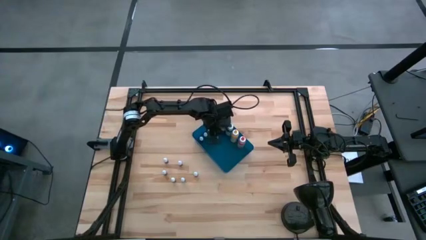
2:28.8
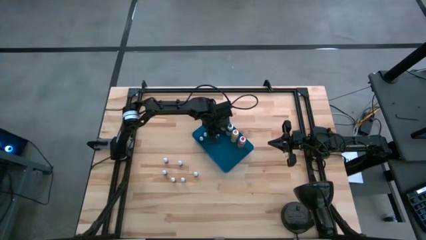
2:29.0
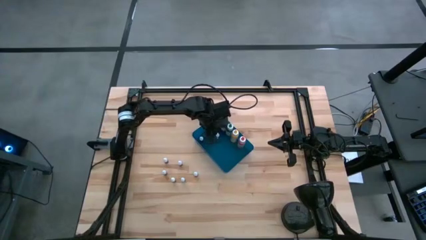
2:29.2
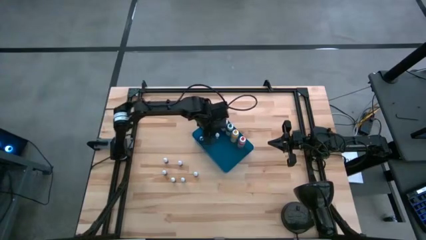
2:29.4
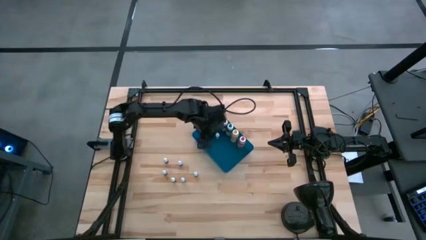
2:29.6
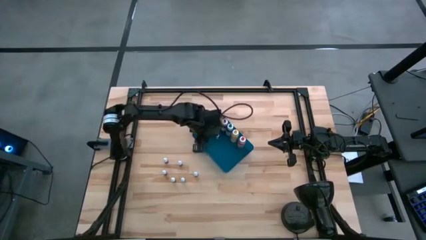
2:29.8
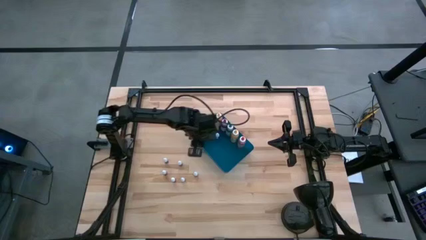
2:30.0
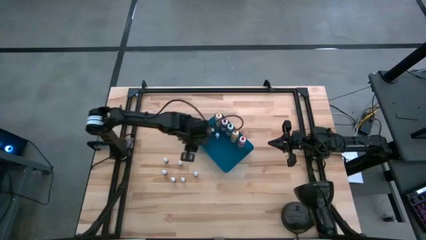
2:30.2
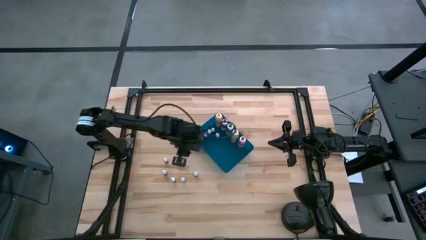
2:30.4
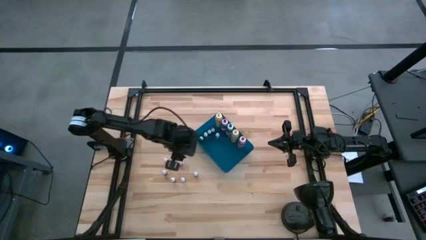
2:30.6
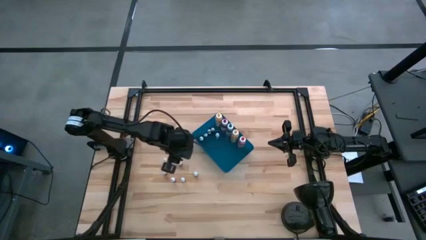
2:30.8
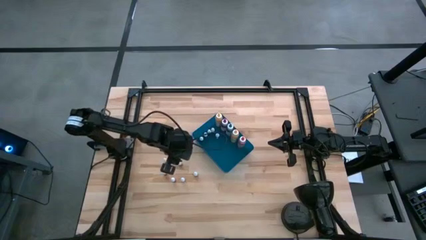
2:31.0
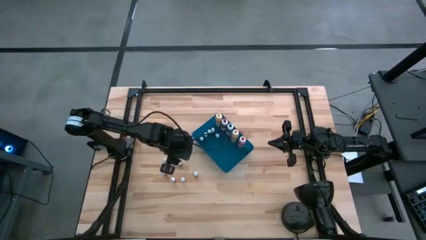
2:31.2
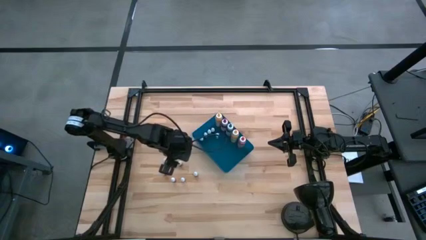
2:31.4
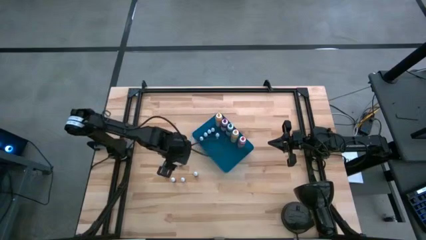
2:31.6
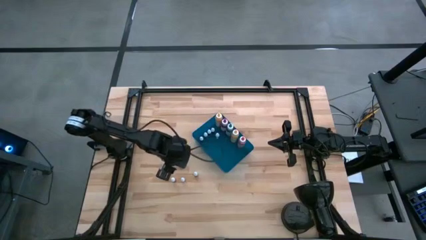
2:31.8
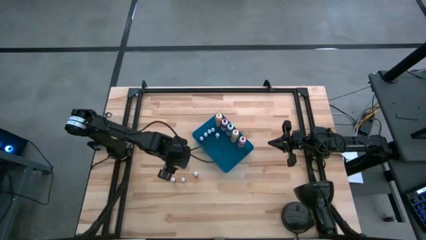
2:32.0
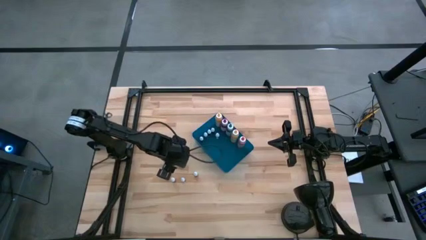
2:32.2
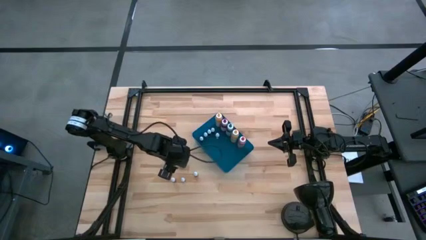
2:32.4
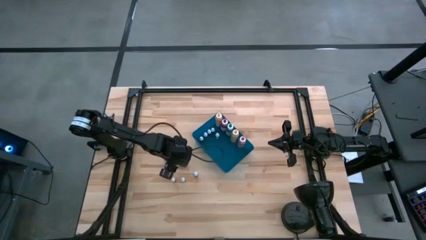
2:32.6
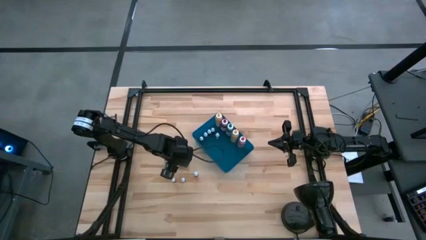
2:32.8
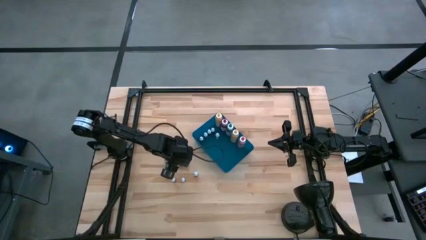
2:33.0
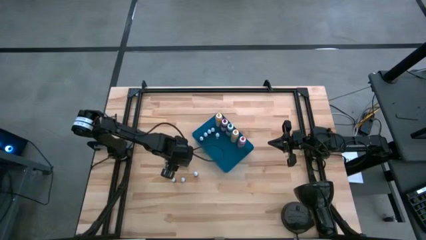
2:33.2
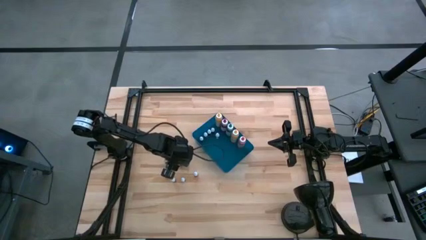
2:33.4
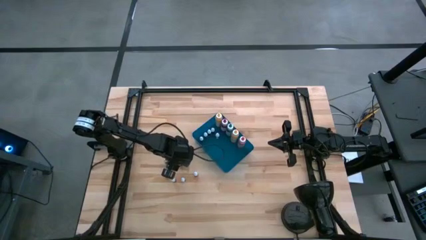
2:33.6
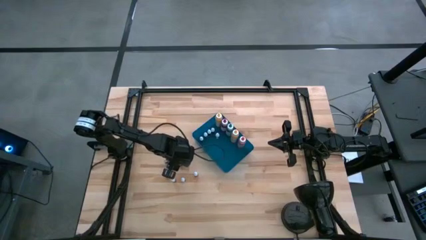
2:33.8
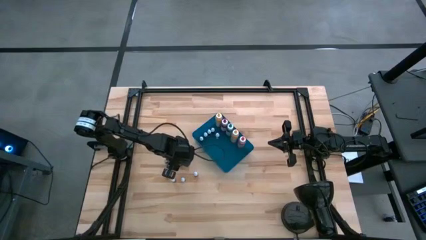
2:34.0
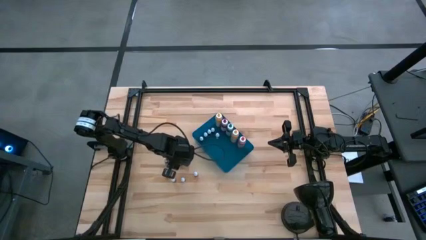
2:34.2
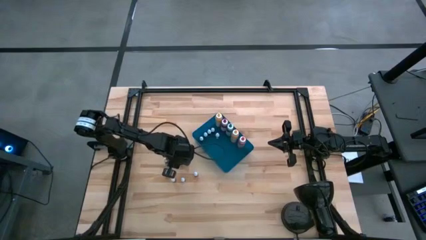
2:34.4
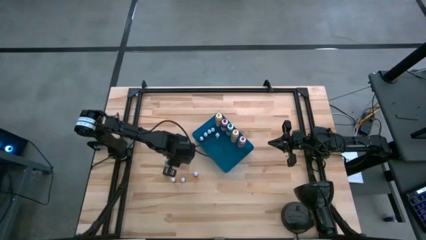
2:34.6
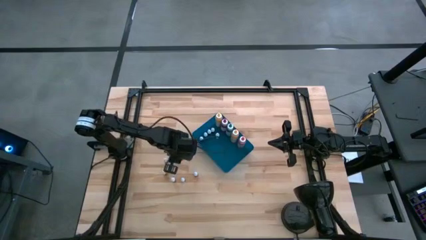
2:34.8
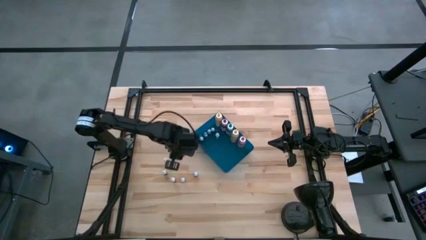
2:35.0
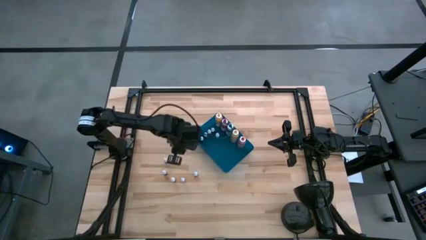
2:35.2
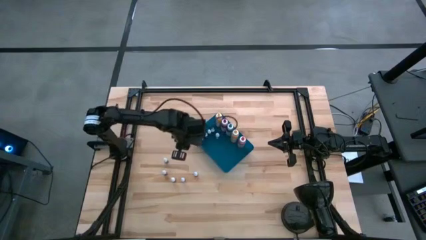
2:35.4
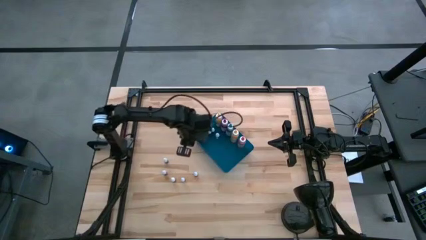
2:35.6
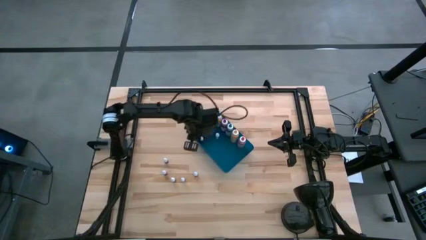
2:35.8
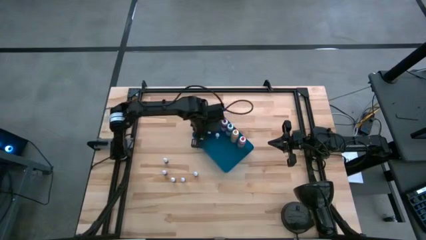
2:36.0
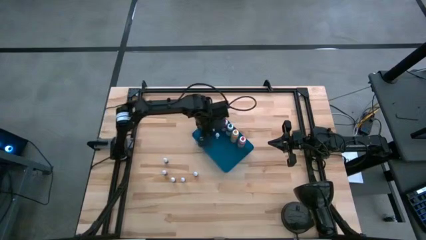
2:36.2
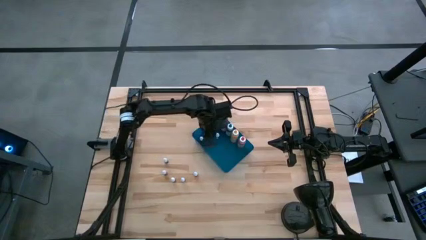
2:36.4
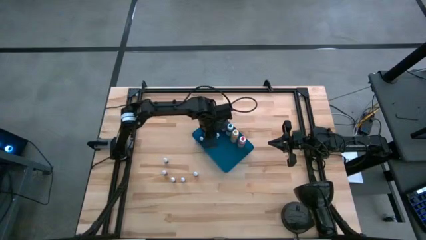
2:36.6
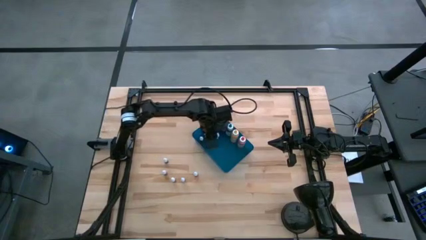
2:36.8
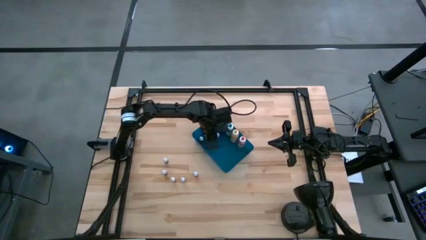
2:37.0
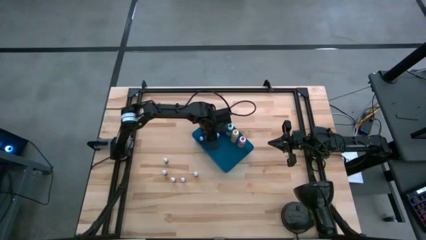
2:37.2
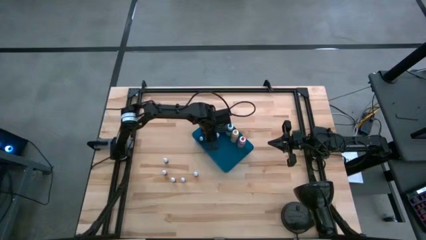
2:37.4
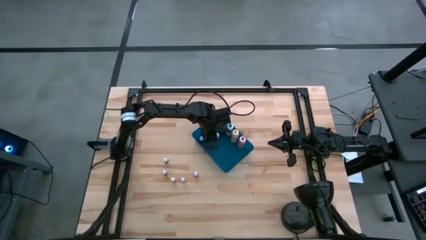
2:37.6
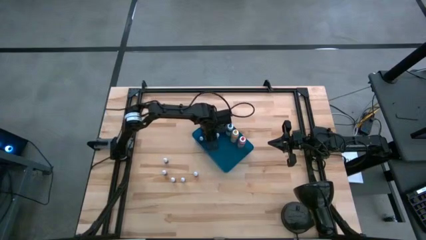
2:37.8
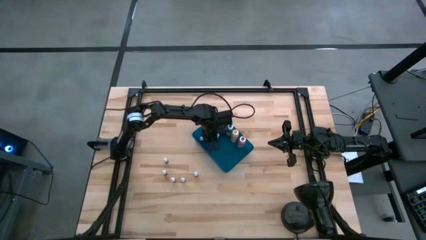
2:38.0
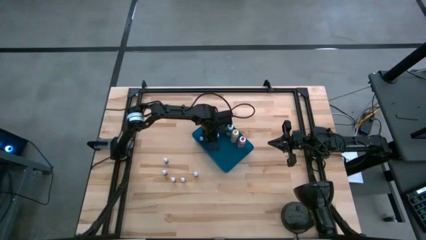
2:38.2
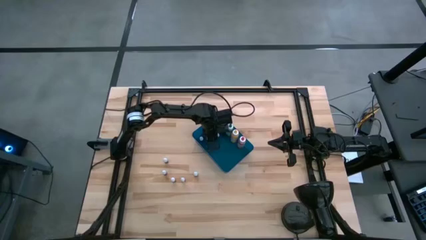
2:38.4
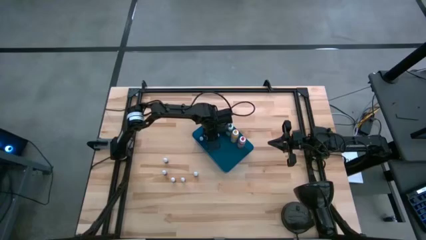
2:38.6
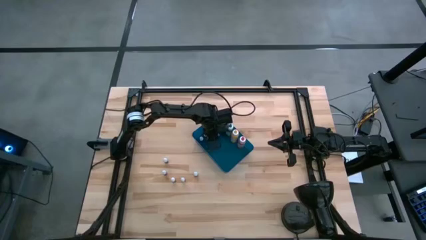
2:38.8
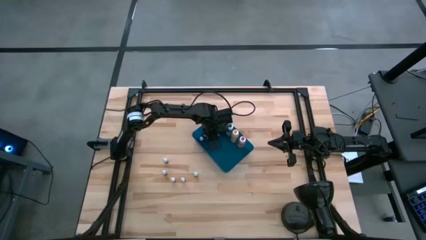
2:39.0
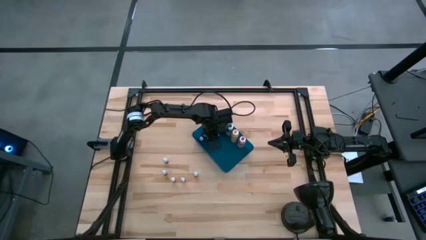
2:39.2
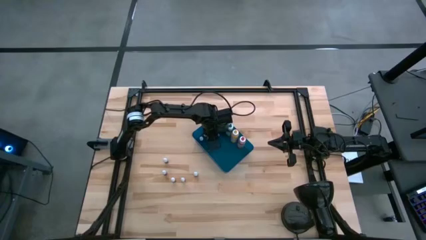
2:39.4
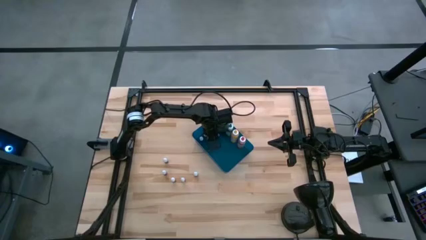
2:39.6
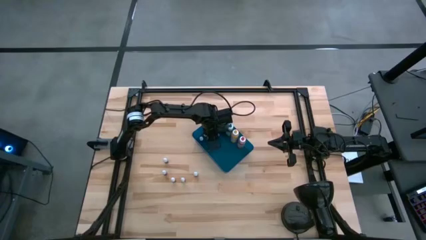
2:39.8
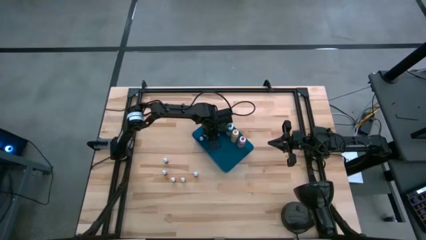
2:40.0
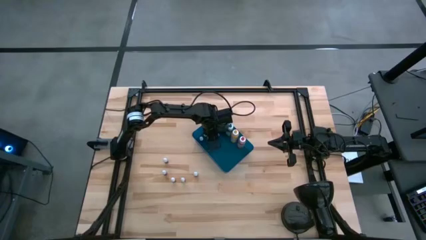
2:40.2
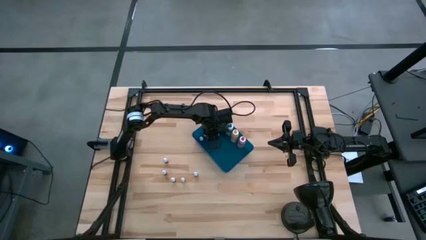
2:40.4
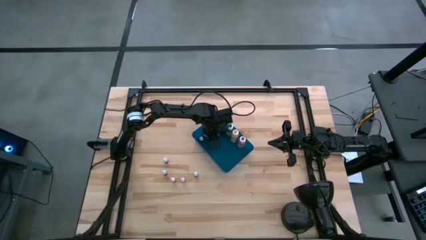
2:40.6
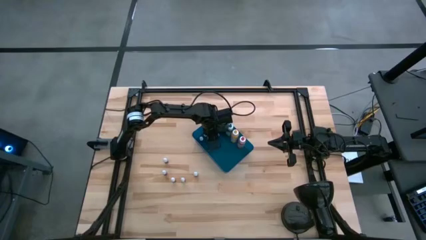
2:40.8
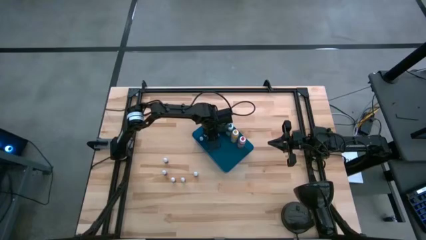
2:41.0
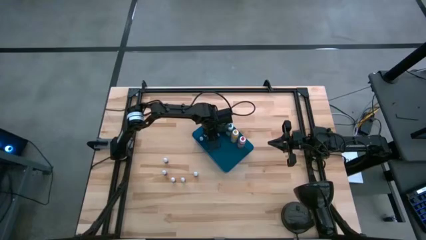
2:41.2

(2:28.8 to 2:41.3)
Task: Pick & Place food coloring
Put the blue food coloring bottle into the blue bin

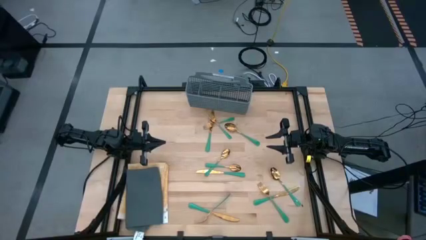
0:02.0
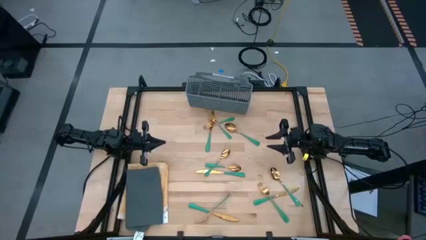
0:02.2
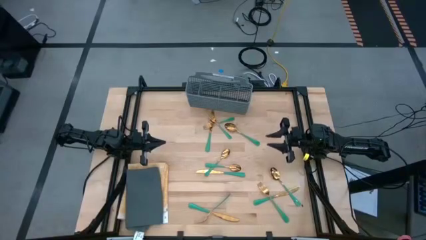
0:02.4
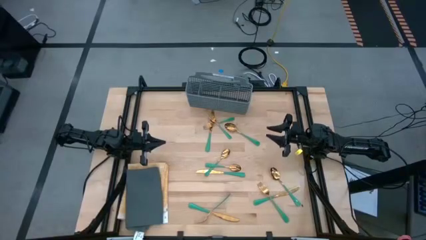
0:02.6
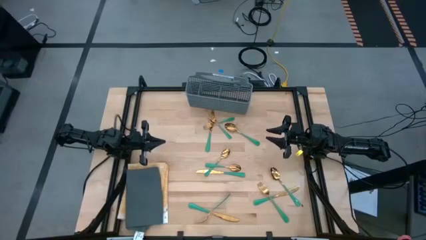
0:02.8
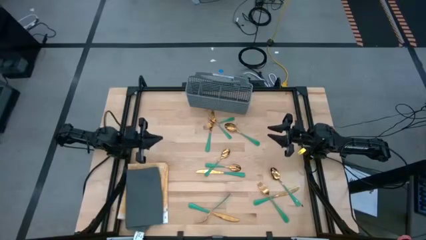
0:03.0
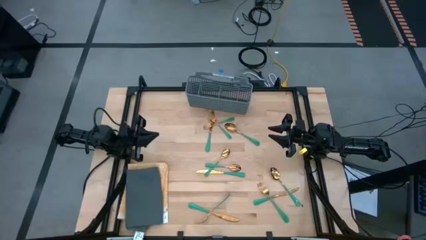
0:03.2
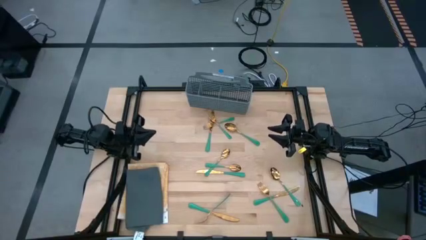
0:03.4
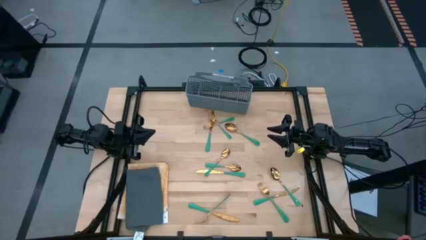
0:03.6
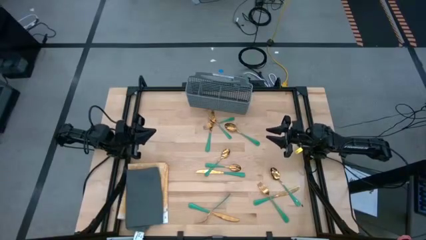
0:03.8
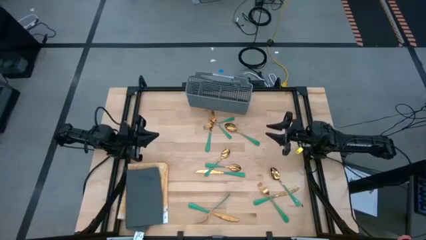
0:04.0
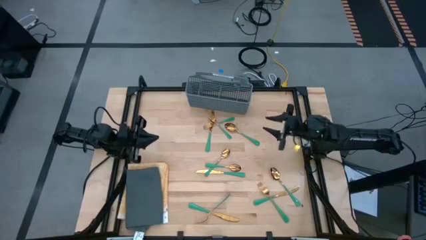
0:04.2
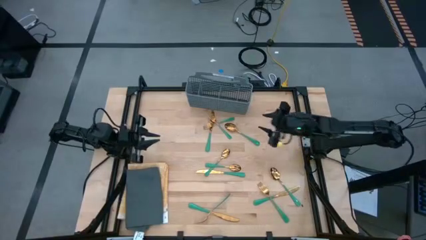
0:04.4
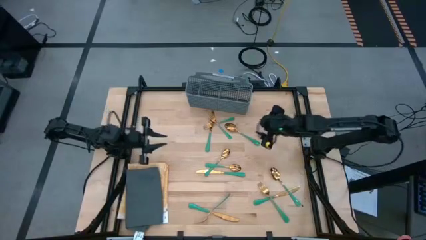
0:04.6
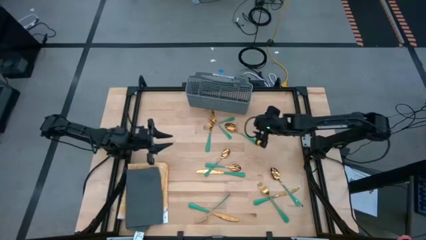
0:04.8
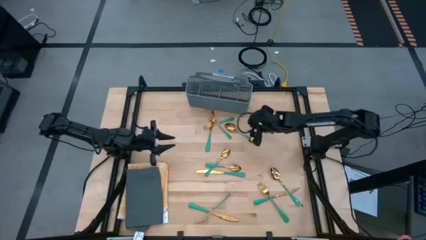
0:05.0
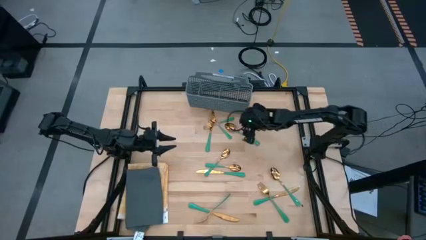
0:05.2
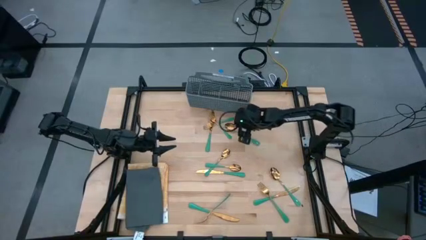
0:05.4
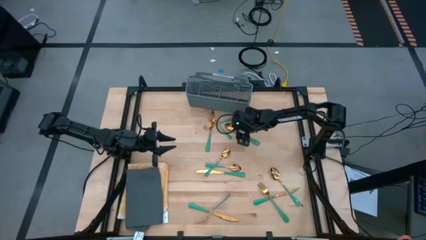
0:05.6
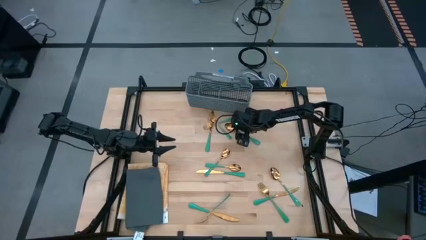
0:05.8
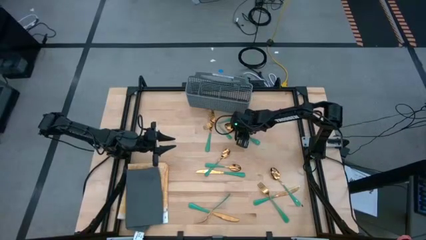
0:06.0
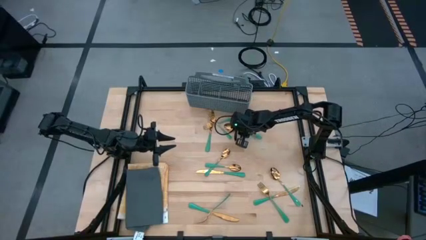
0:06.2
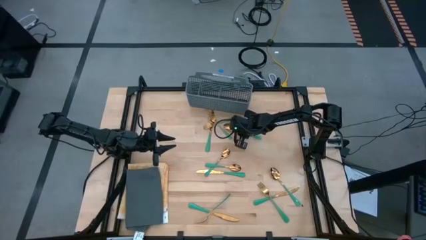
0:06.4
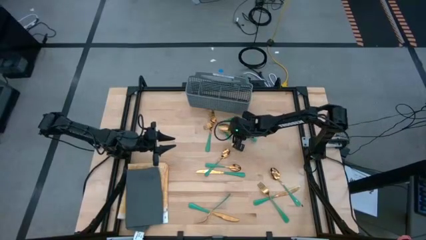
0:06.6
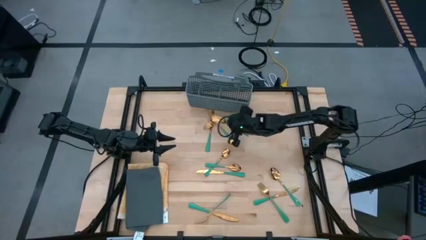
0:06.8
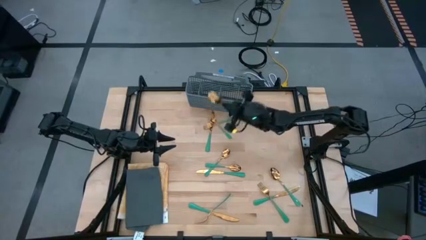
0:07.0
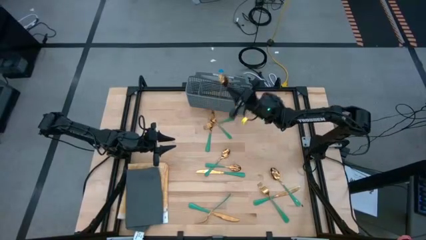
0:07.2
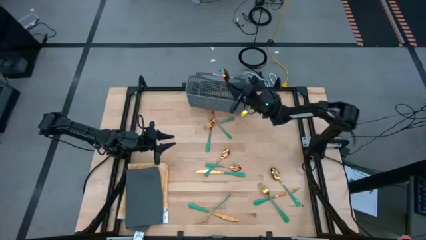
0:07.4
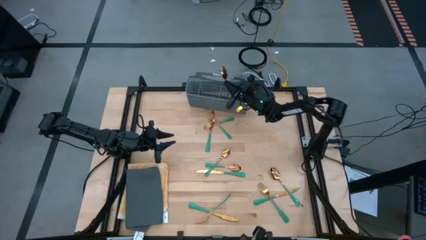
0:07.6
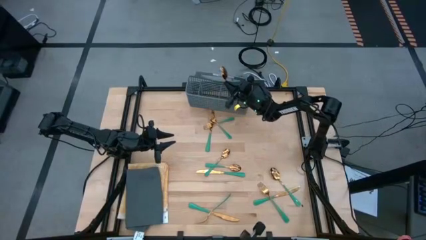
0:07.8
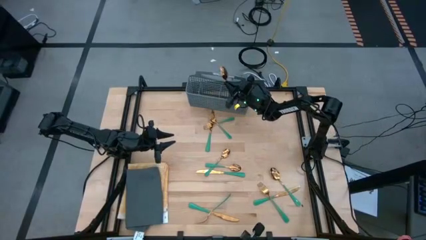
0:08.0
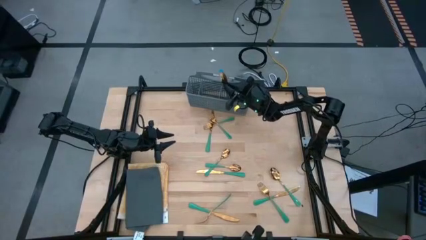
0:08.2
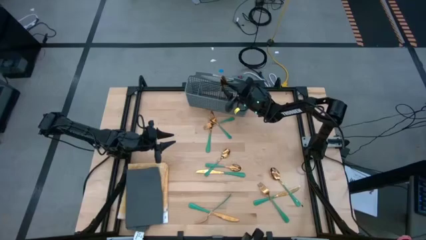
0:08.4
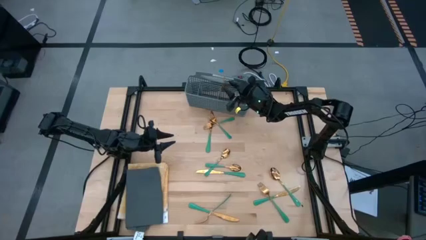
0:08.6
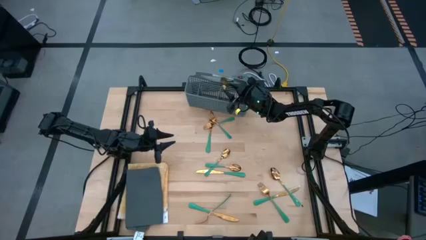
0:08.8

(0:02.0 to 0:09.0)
Task: Sort silverware
Put the green spoon into the gray silverware holder
